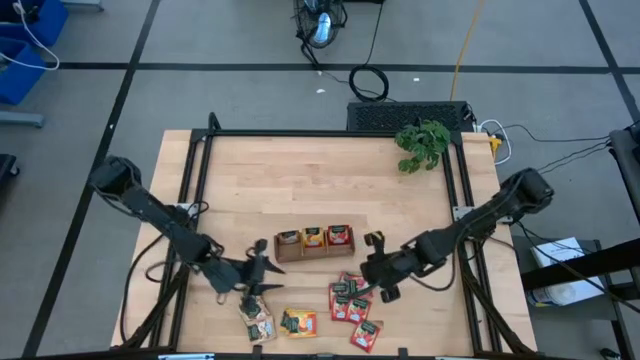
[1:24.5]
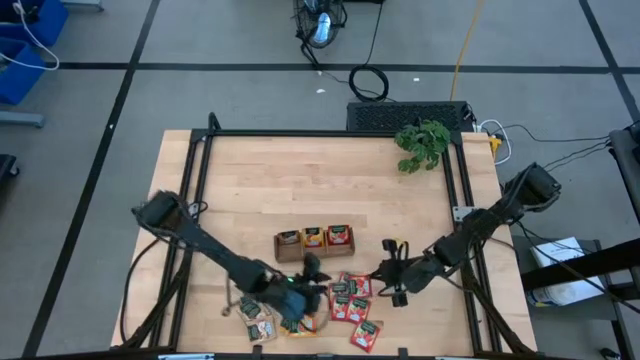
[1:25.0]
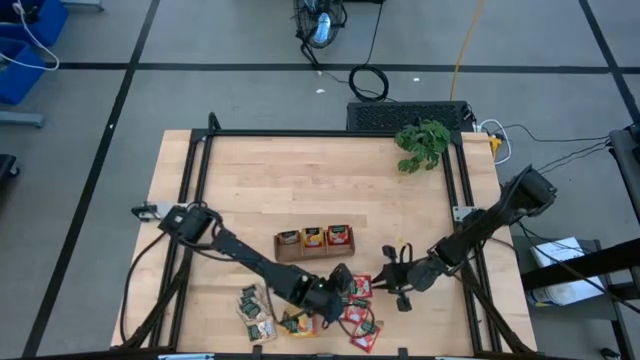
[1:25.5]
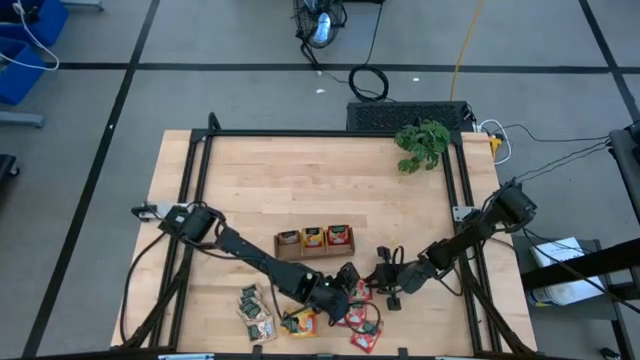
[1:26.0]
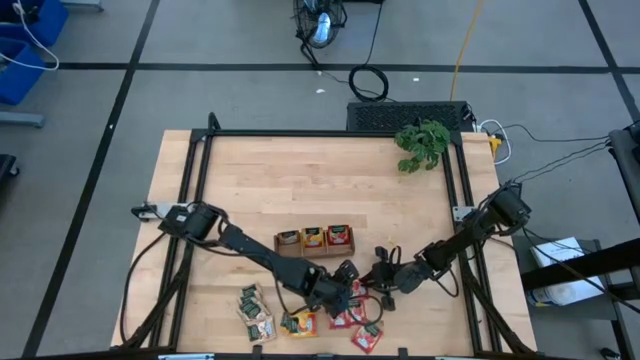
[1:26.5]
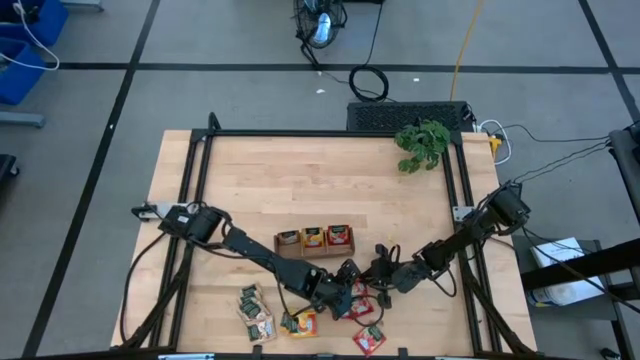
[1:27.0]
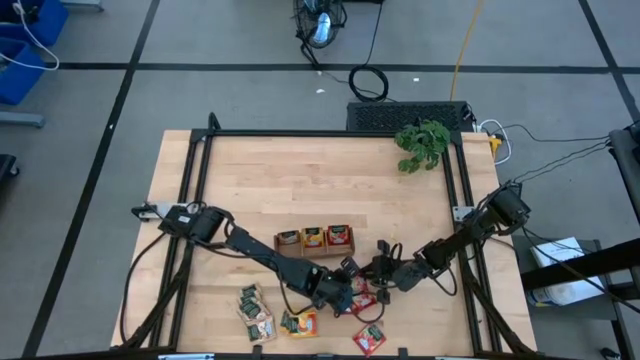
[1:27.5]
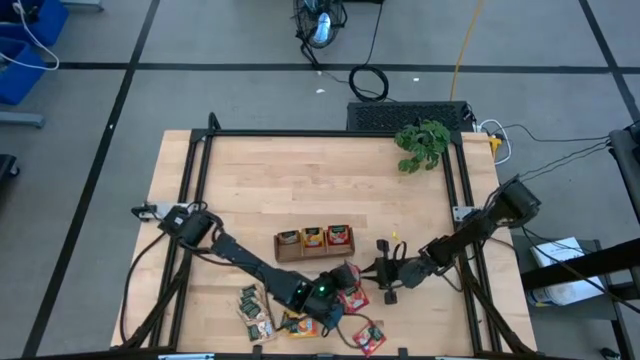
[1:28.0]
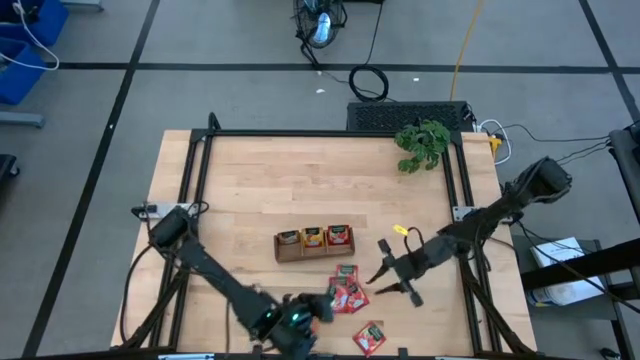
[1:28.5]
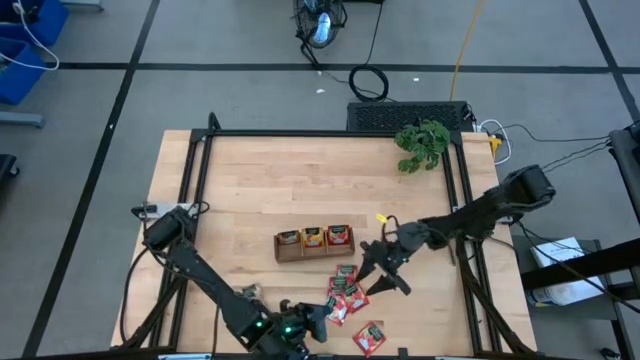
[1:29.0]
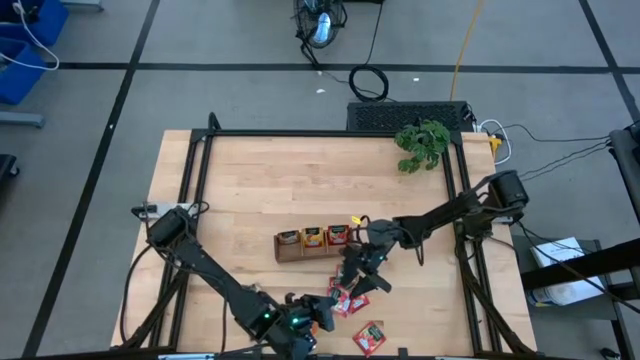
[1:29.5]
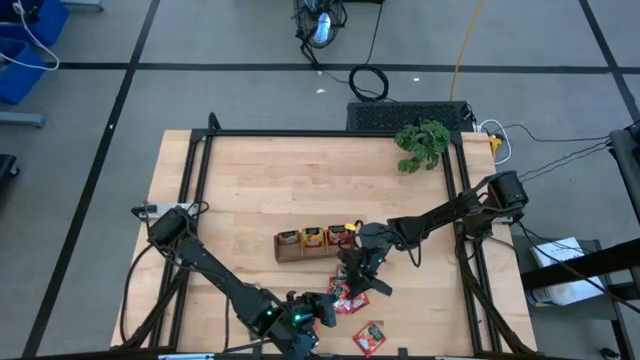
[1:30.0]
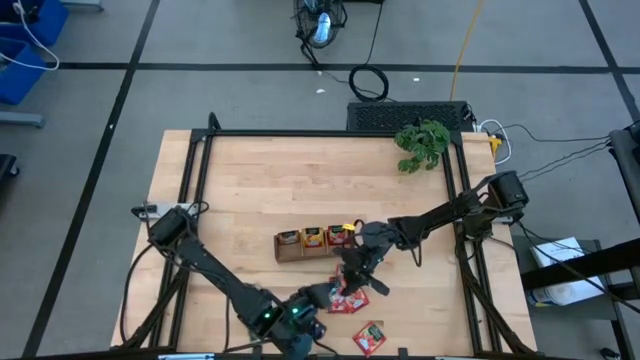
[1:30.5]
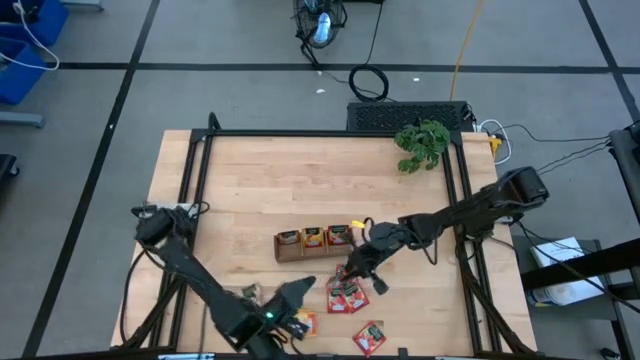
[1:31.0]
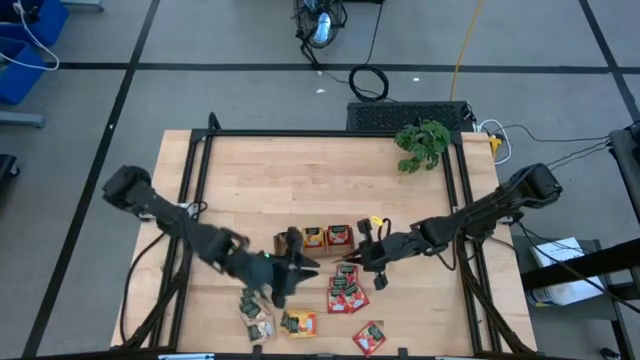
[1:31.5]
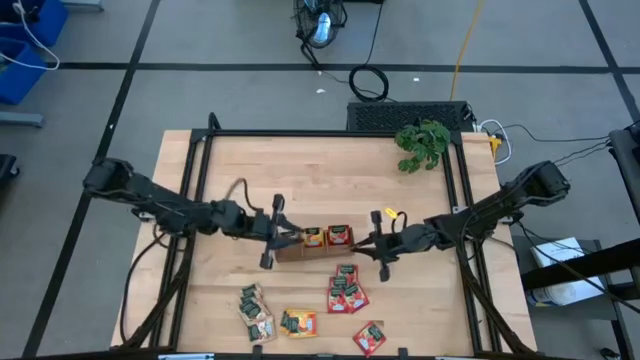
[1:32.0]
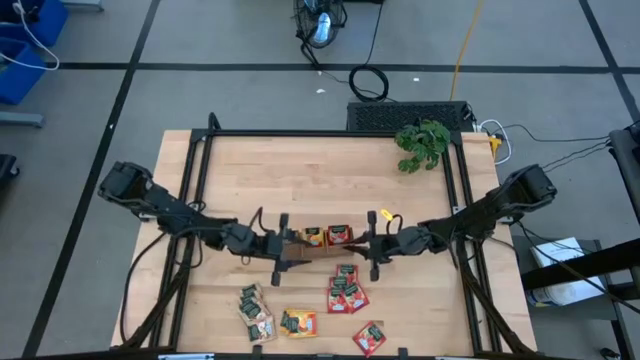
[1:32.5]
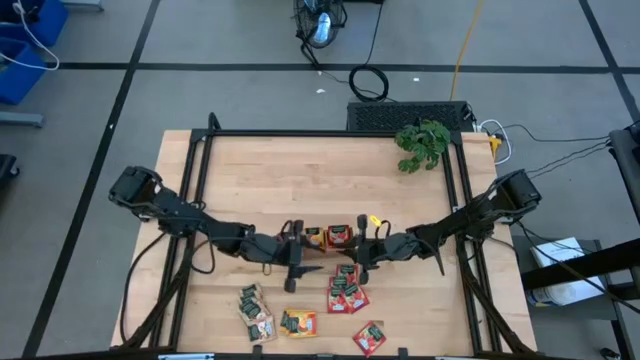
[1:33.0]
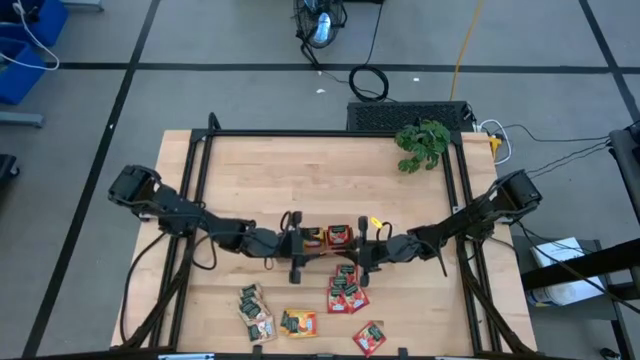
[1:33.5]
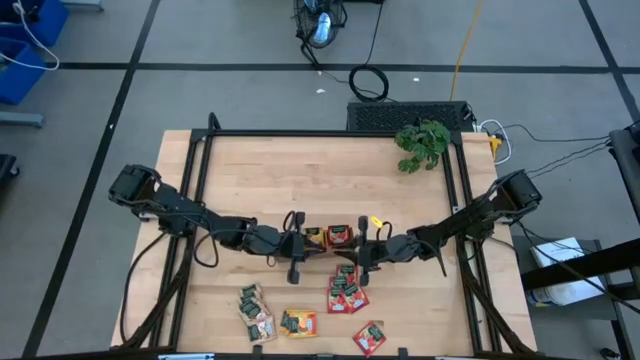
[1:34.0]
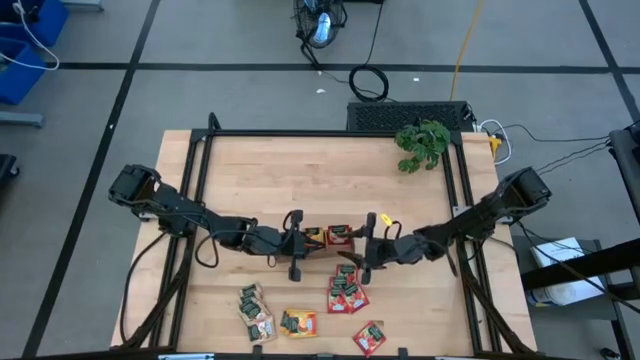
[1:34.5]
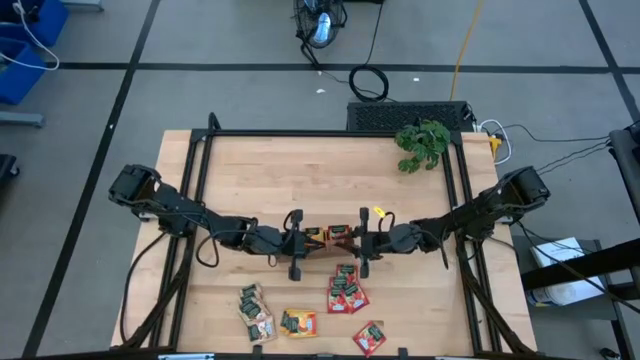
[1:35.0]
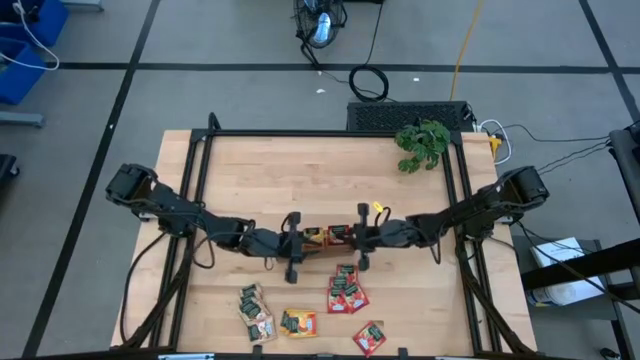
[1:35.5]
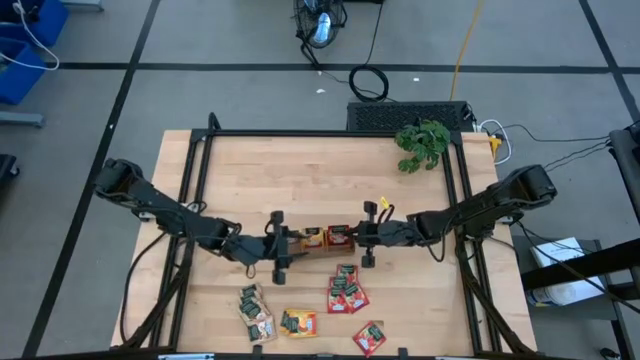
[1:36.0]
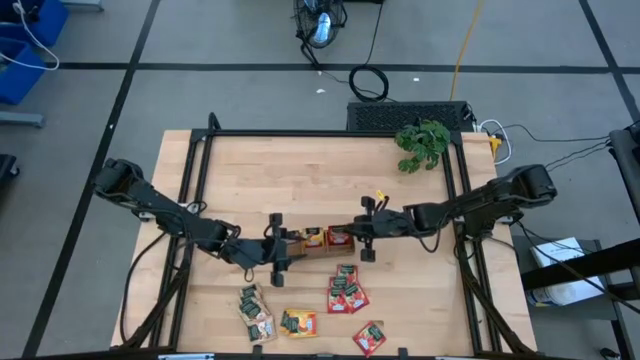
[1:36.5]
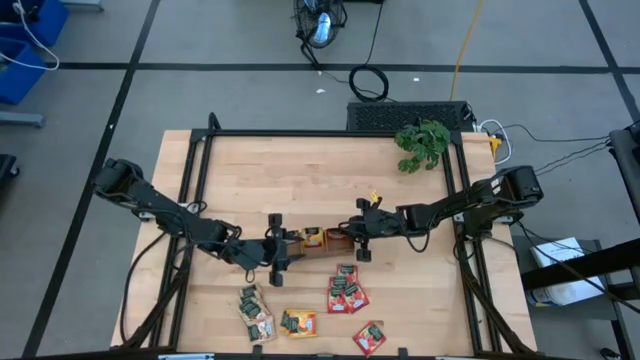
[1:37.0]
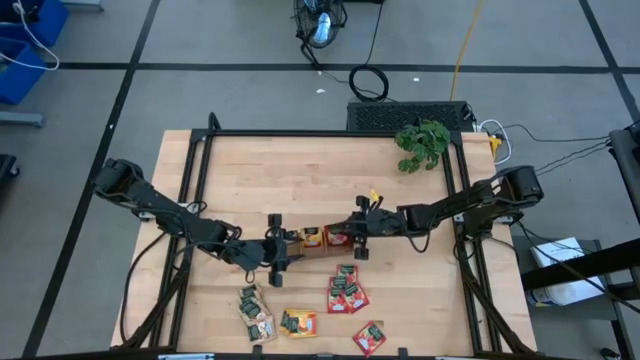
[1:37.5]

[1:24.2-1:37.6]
Task: Pick & Place Tea
Put the red tea bag into the right section of the wooden organizer

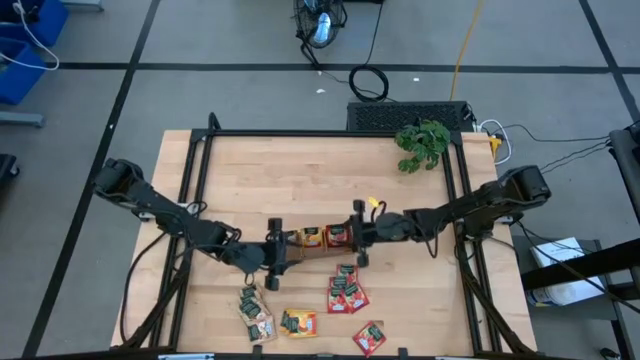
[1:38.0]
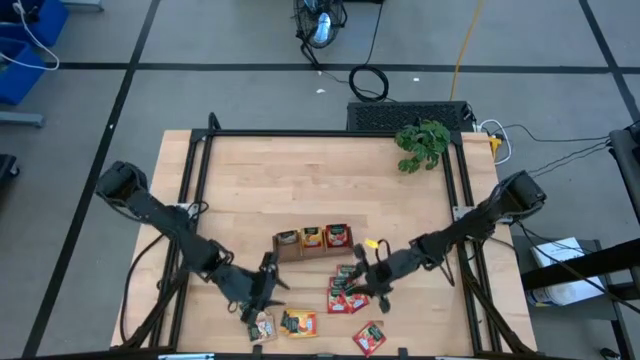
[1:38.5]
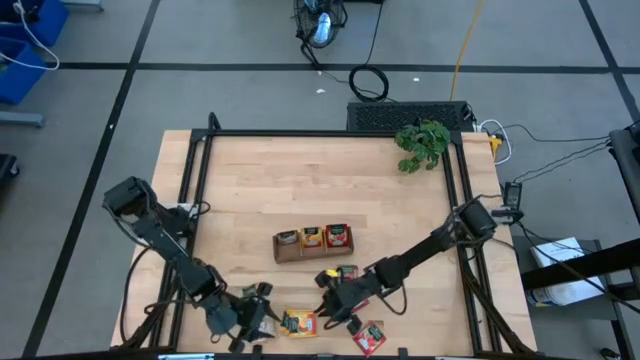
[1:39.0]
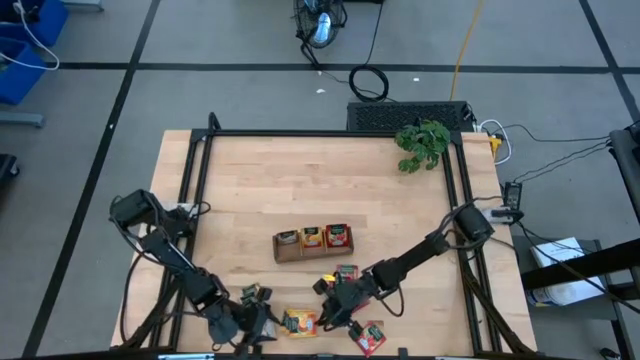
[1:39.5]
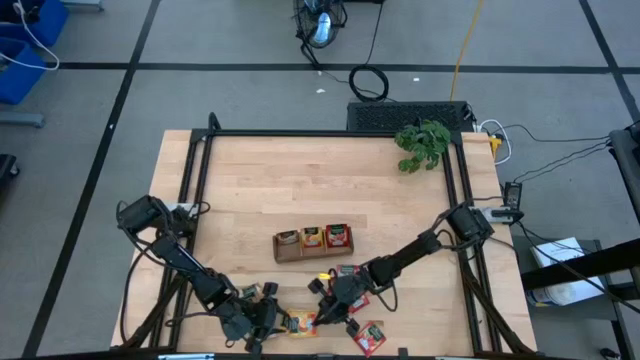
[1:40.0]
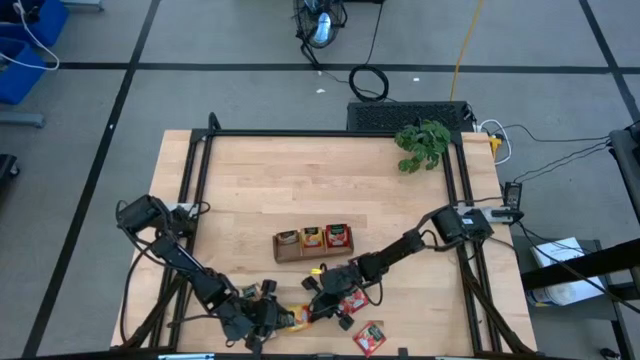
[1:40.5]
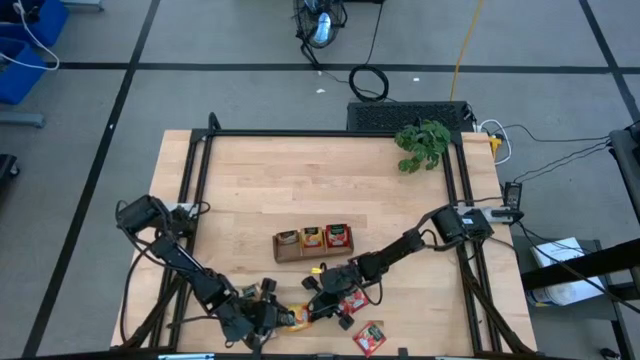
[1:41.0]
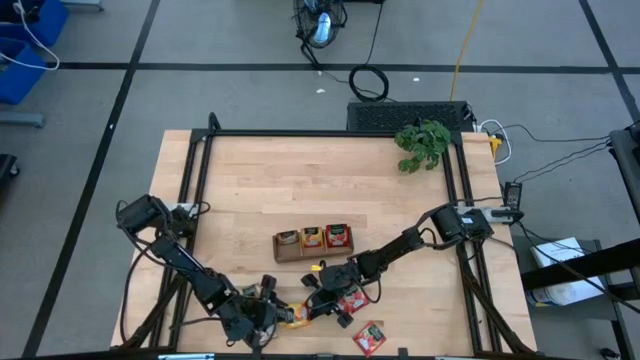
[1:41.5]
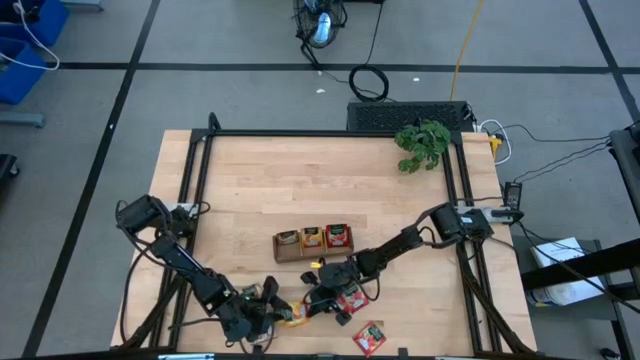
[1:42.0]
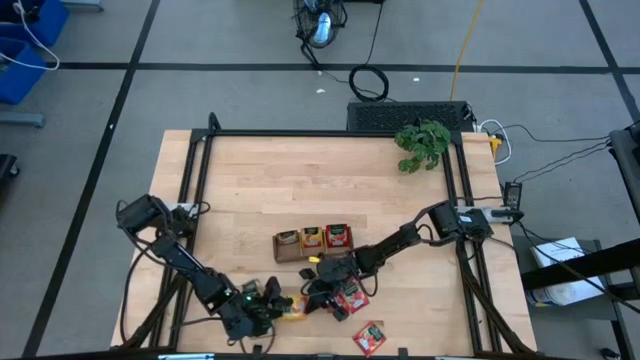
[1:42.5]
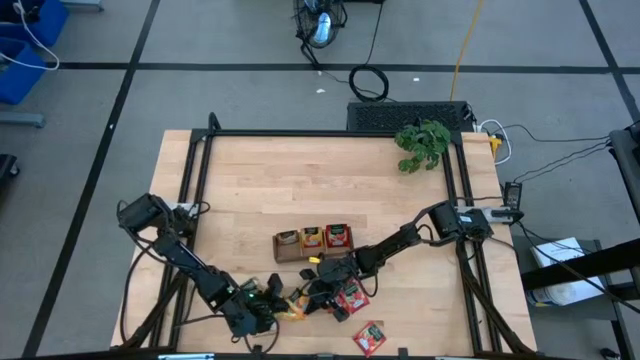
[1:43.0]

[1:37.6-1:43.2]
Put the yellow tea bag into the middle section of the wooden organizer

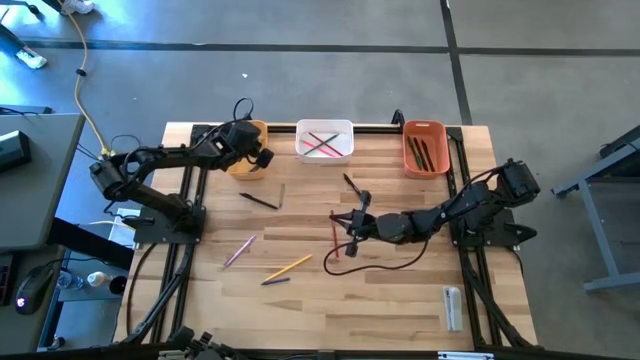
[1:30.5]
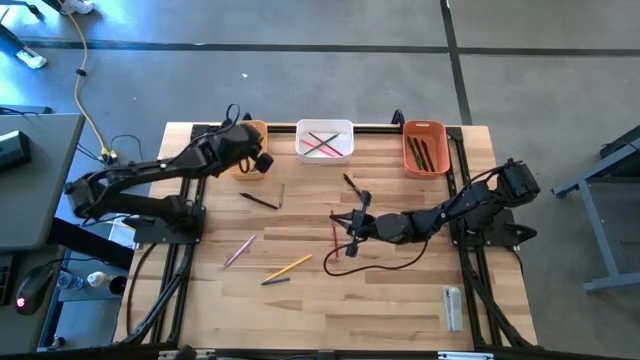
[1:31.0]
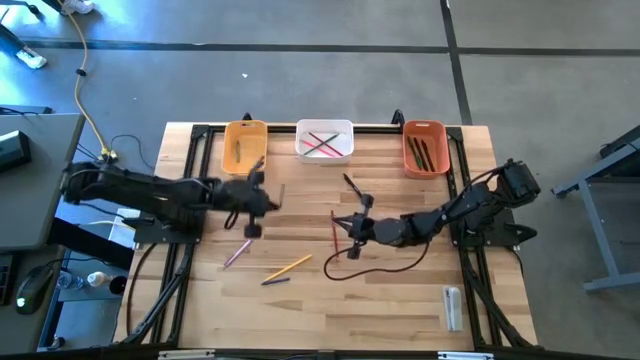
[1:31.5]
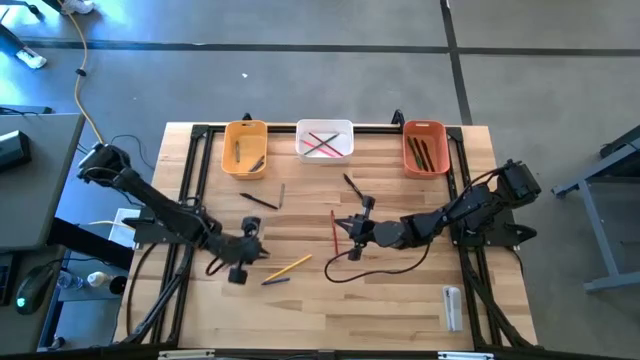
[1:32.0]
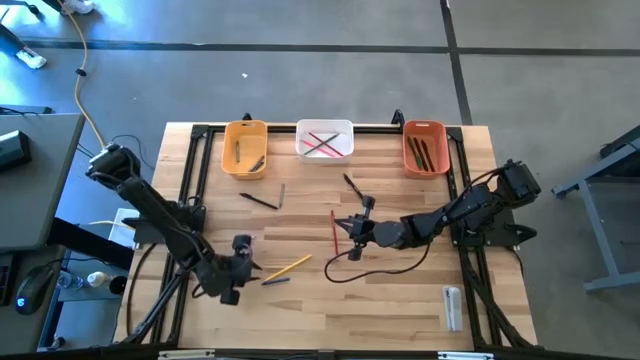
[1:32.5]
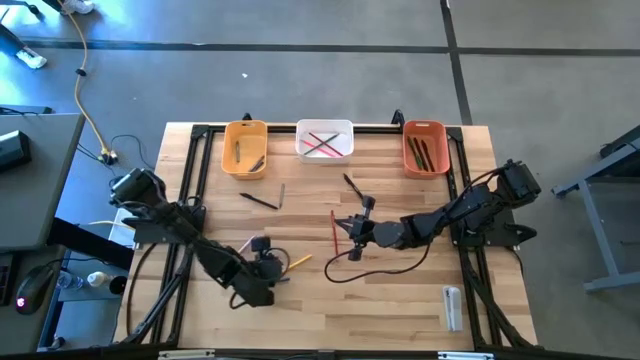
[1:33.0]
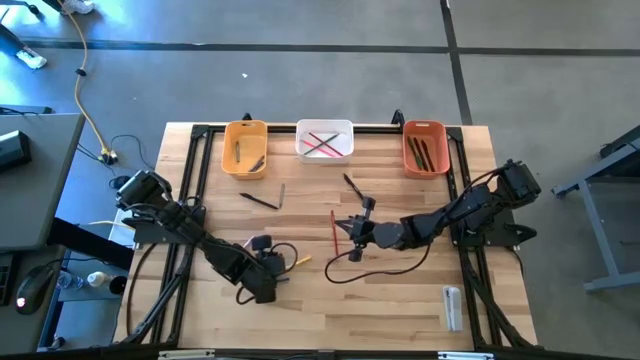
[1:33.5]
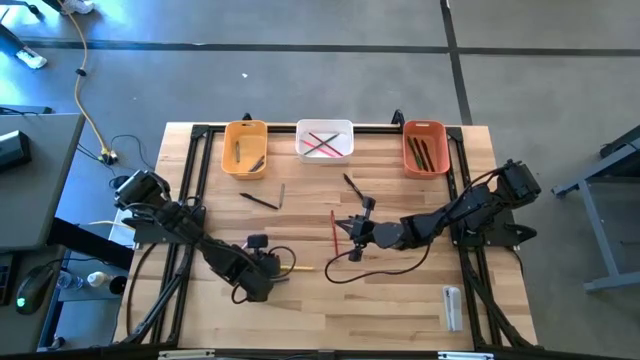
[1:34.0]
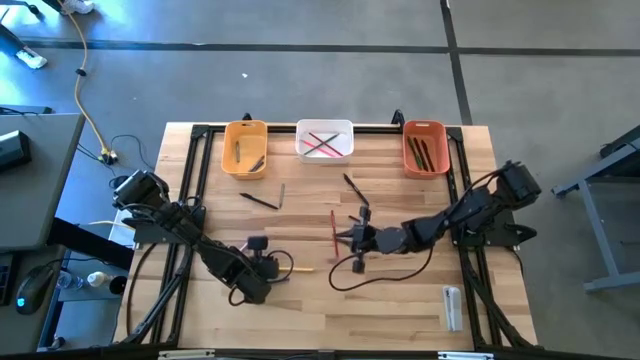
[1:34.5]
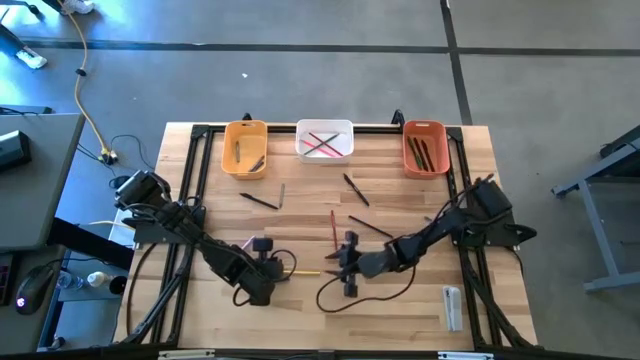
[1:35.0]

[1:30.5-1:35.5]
Task: Sort crayons/erasers/pens/pencils in bins
Put the yellow color pencil into the white bin
